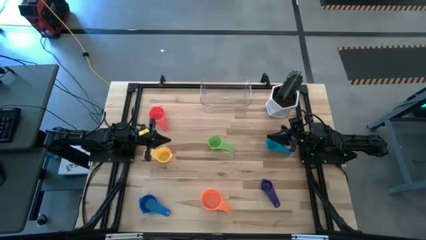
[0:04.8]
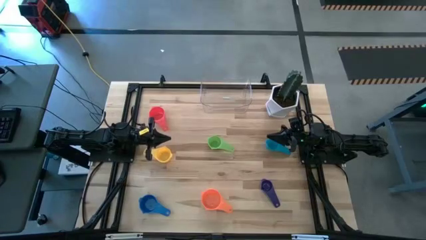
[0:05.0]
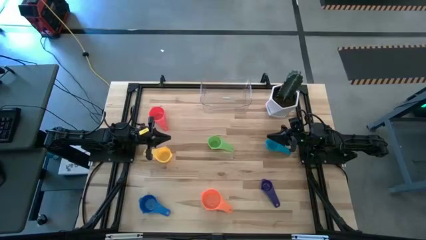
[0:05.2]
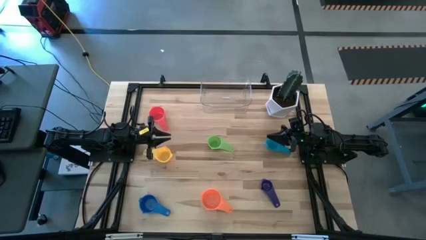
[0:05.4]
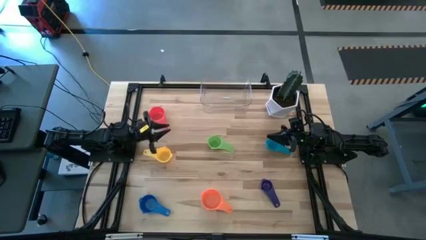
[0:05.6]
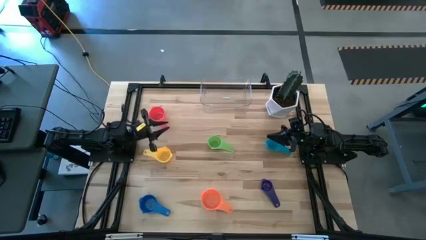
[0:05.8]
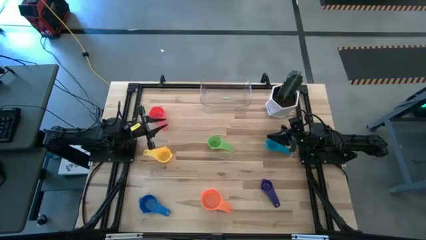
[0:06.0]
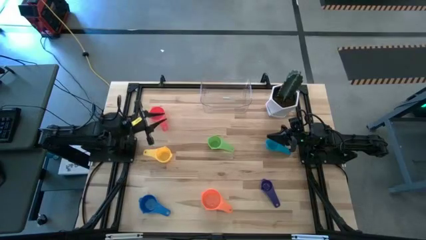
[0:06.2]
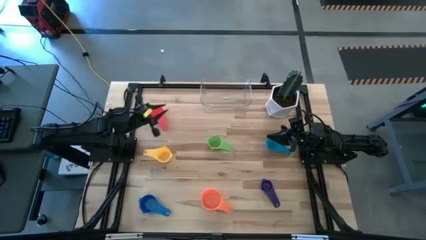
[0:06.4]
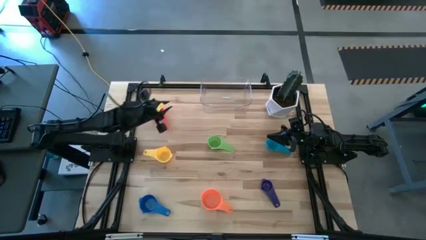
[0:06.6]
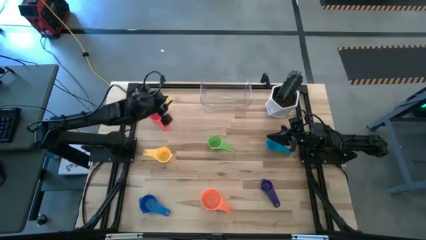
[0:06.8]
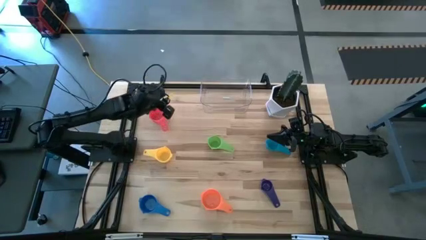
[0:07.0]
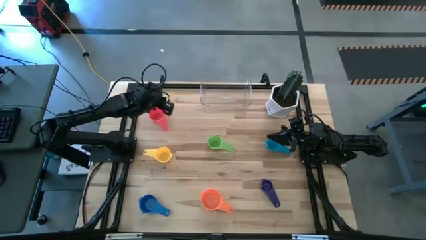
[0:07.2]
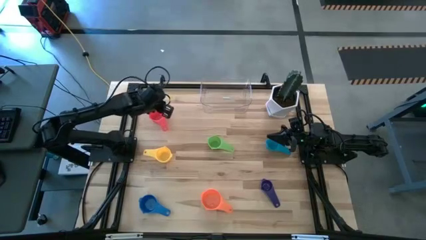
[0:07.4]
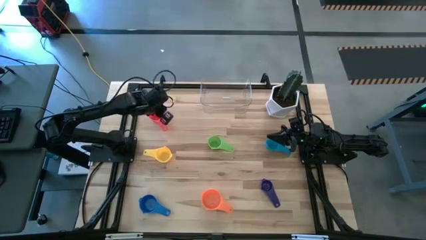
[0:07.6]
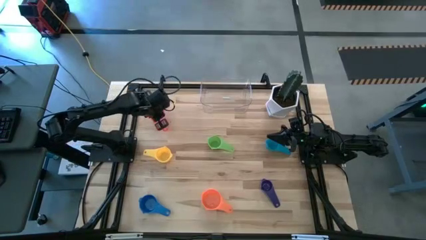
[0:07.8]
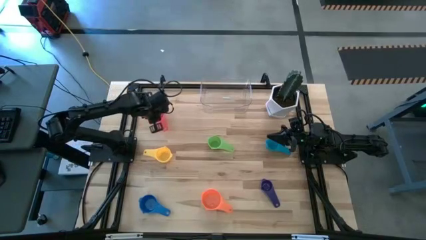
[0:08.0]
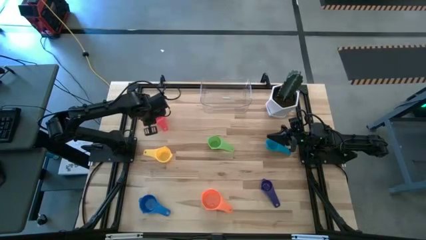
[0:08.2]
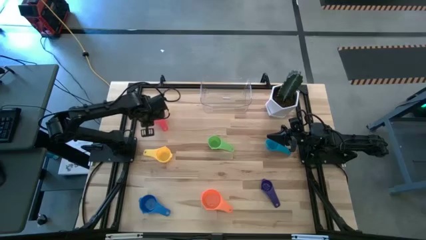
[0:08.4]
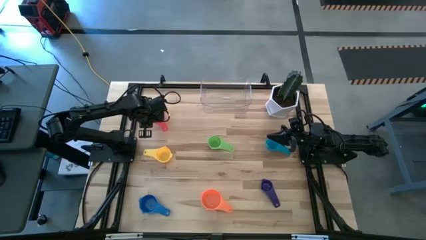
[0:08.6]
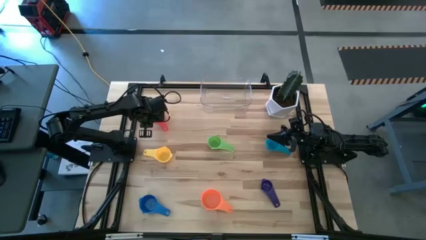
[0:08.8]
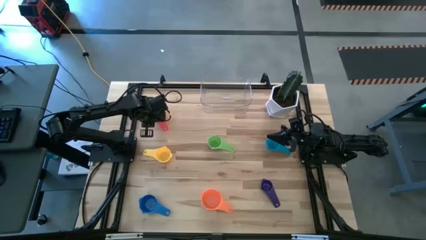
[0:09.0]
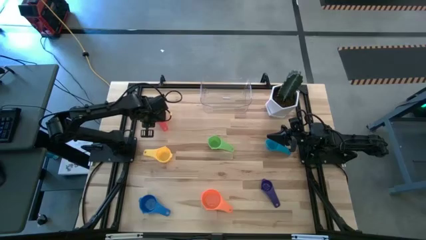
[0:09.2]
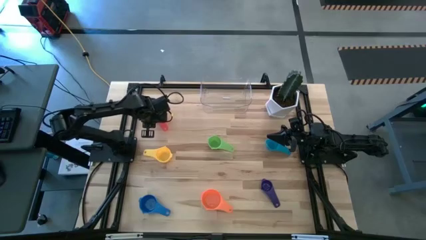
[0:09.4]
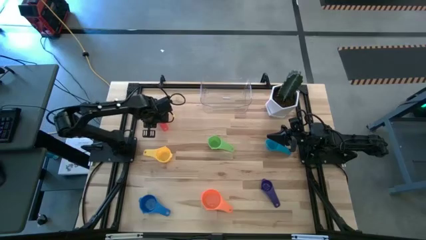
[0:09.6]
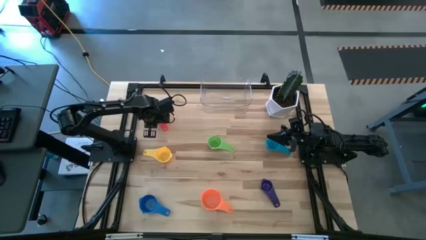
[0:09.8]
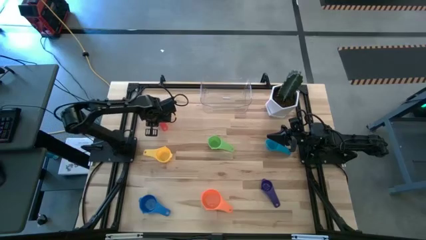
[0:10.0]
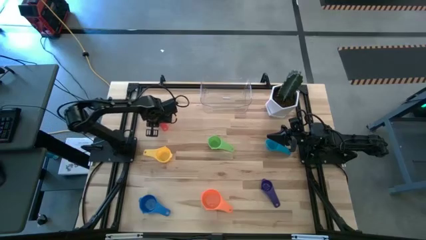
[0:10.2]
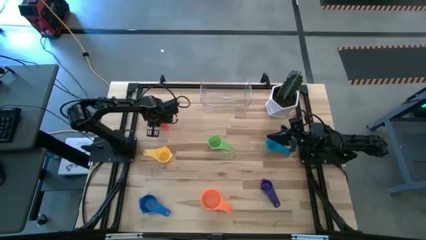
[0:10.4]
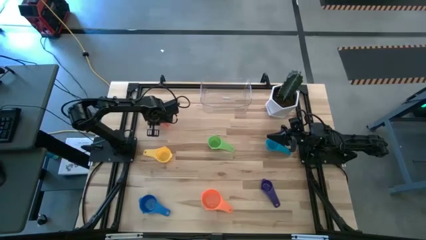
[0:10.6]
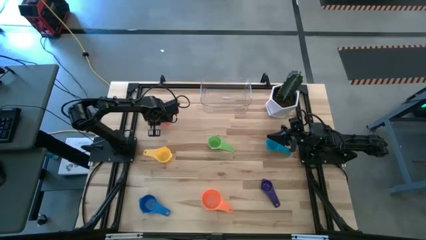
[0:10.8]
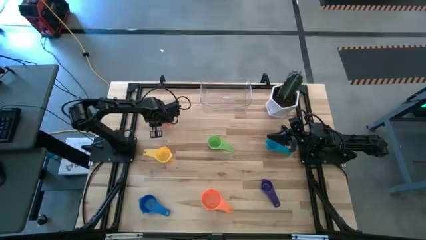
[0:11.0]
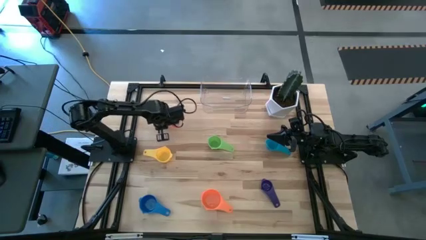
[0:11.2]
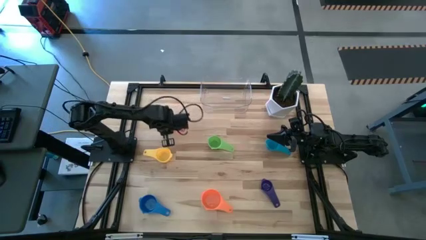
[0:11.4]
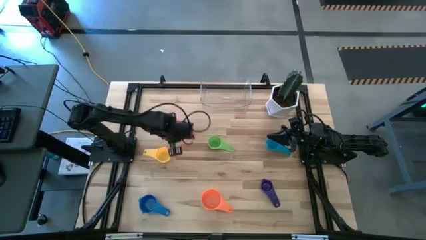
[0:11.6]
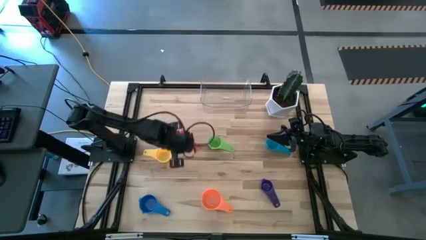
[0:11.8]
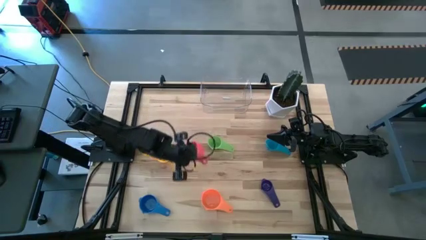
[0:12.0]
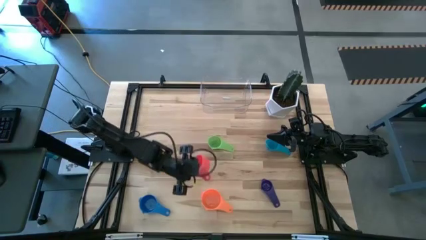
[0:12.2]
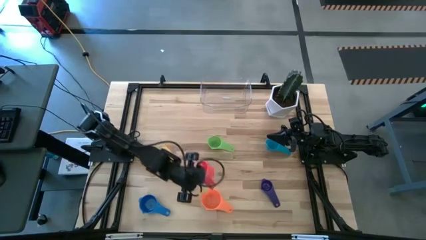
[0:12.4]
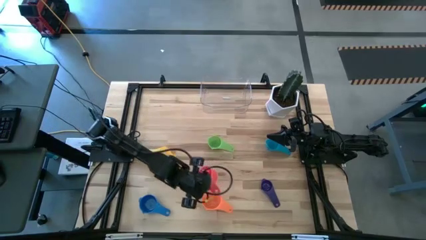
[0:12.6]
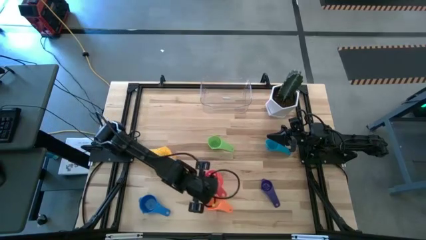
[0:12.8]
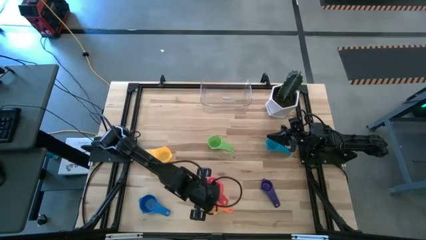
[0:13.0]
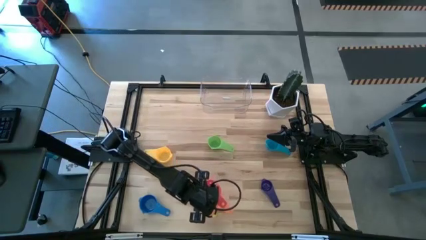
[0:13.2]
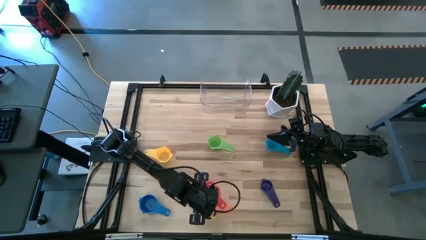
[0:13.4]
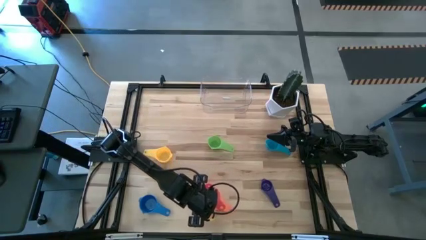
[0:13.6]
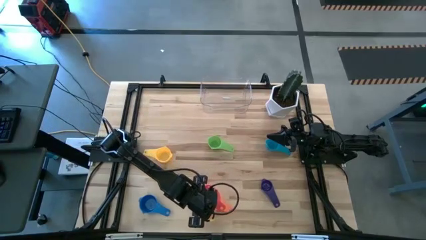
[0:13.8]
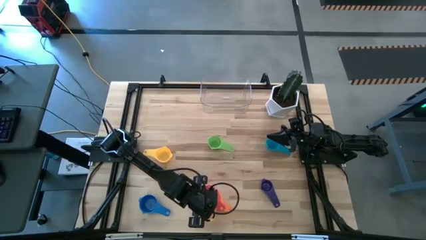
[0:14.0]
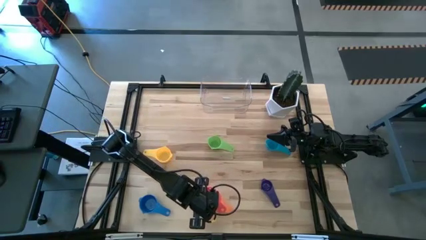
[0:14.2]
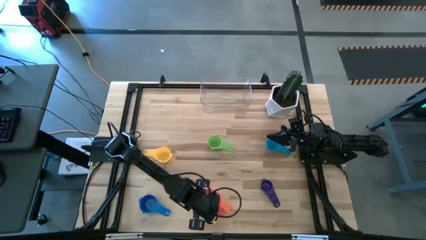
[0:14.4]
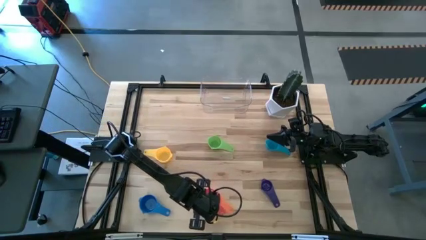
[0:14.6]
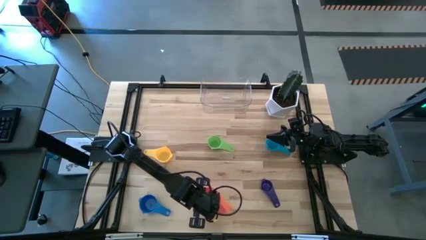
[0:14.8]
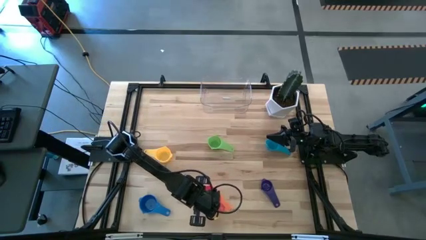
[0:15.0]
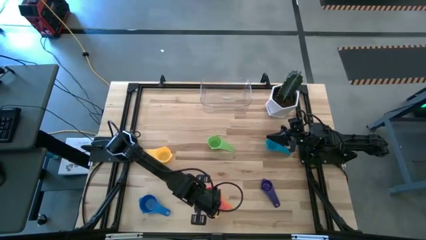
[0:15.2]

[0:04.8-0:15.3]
Task: Nest measuring cups in basket
Stack the red measuring cup on top of the orange measuring cup
